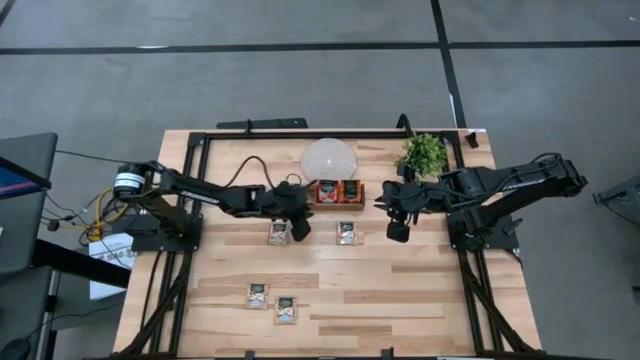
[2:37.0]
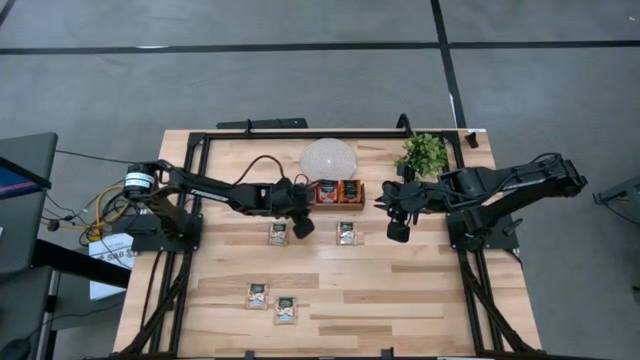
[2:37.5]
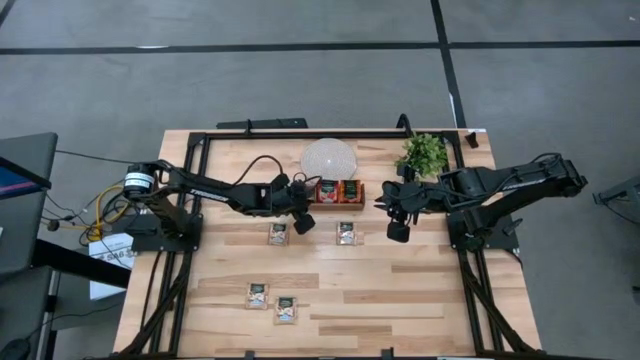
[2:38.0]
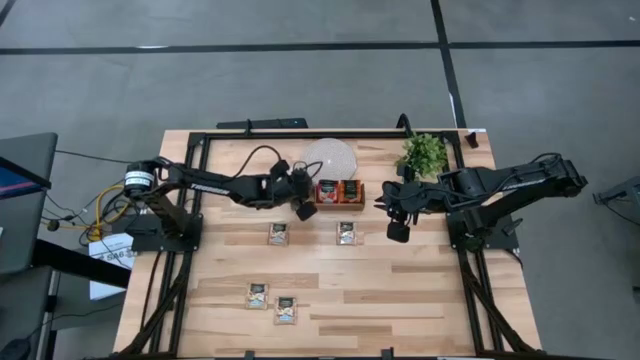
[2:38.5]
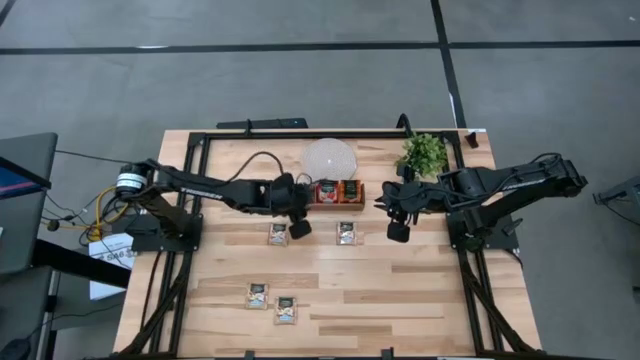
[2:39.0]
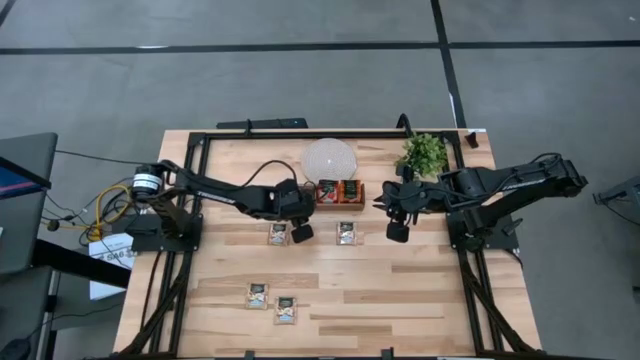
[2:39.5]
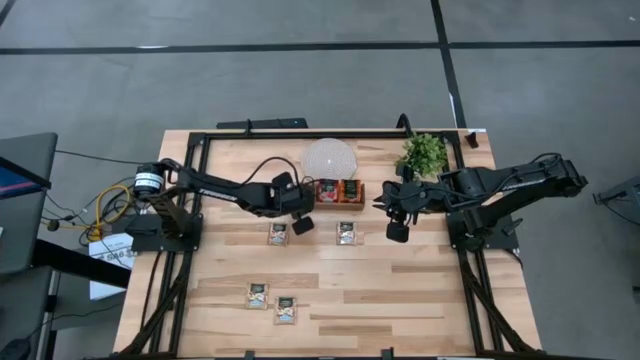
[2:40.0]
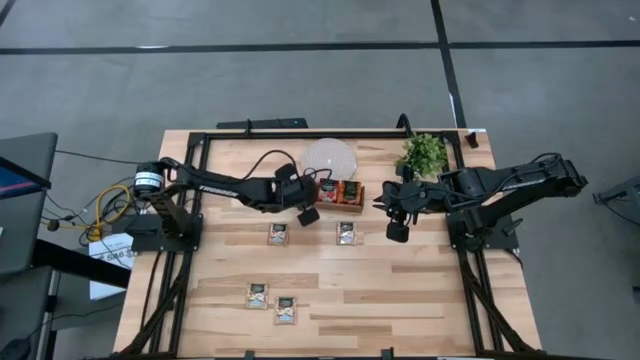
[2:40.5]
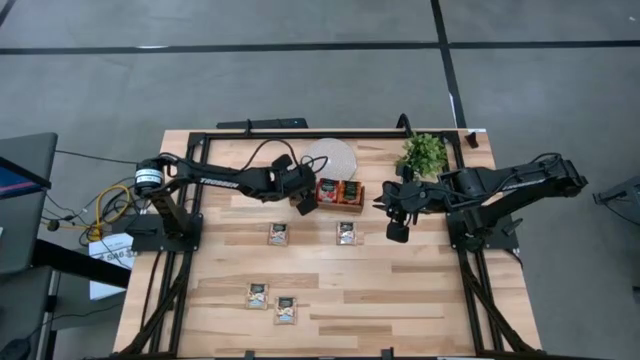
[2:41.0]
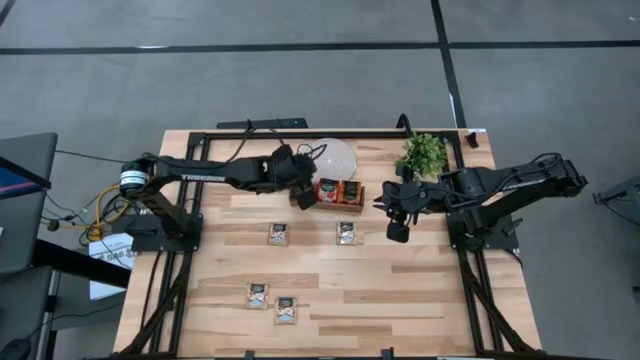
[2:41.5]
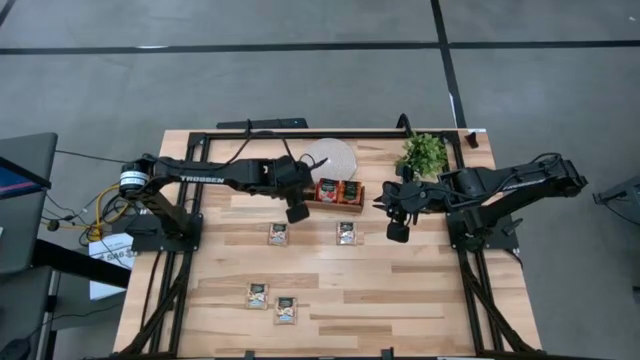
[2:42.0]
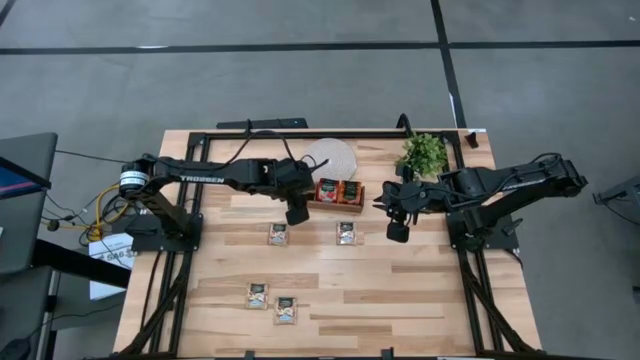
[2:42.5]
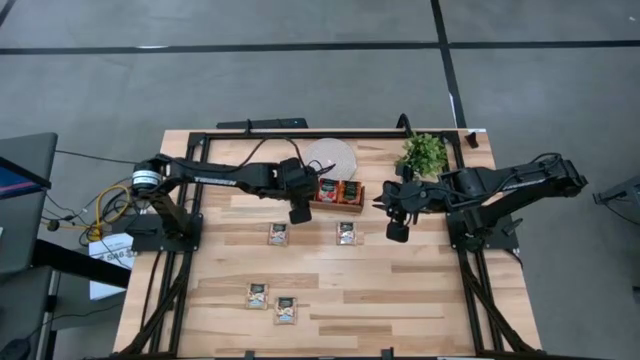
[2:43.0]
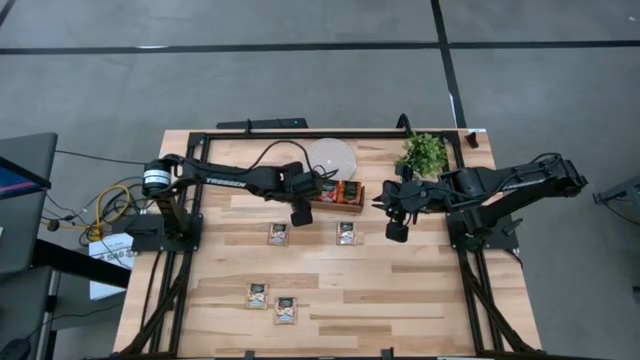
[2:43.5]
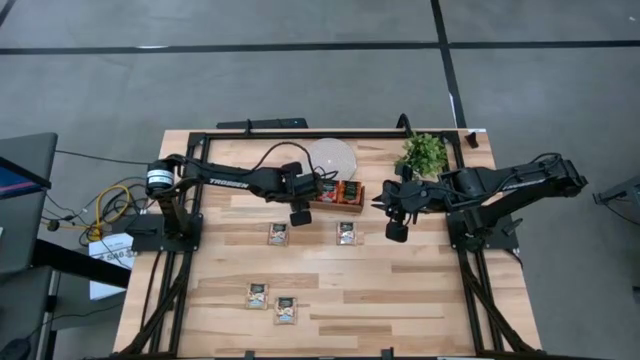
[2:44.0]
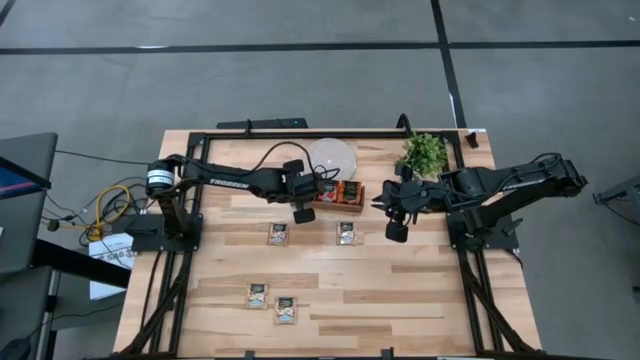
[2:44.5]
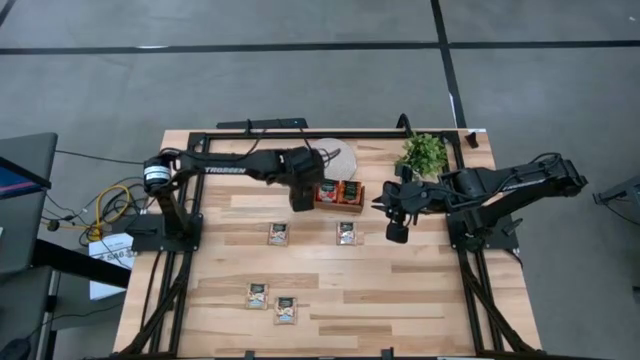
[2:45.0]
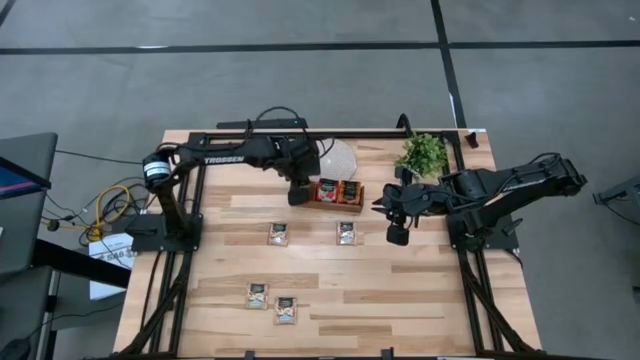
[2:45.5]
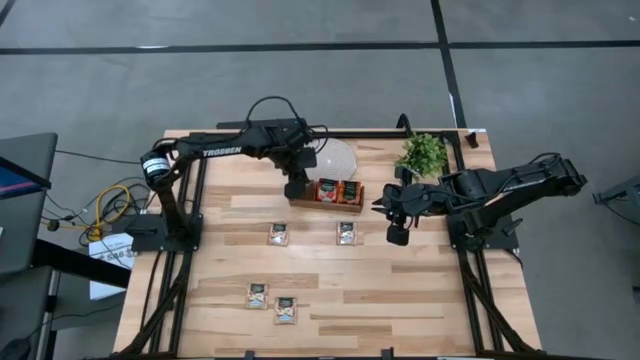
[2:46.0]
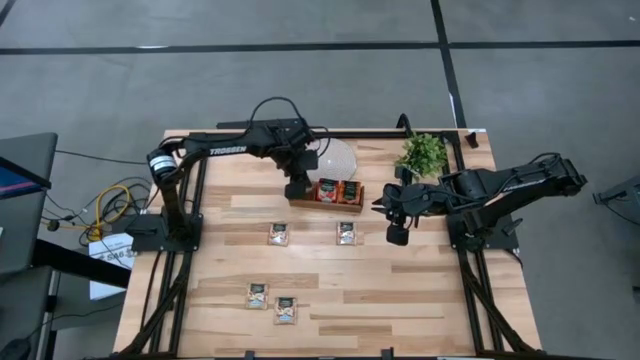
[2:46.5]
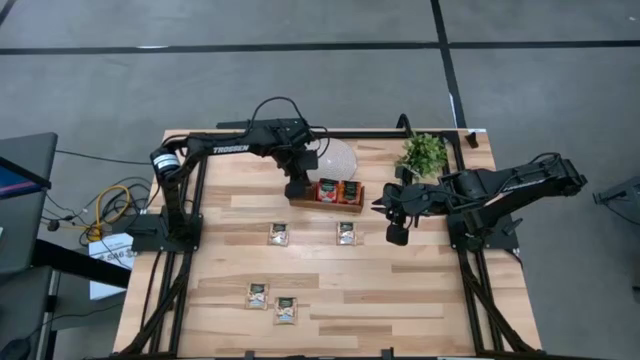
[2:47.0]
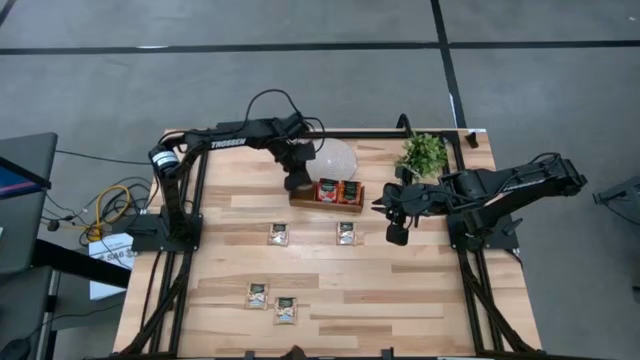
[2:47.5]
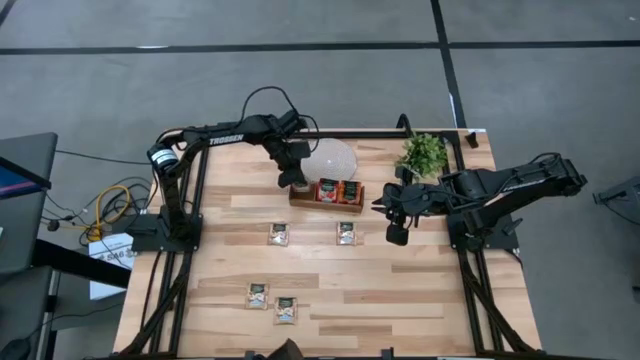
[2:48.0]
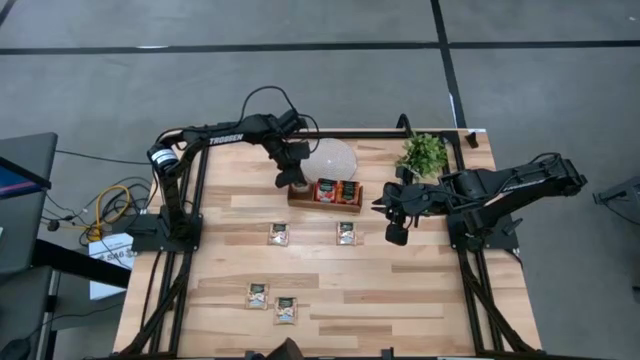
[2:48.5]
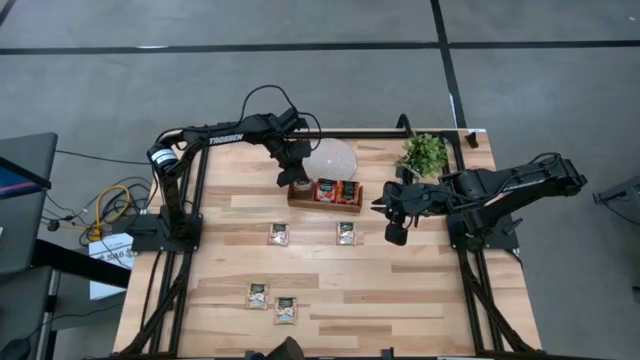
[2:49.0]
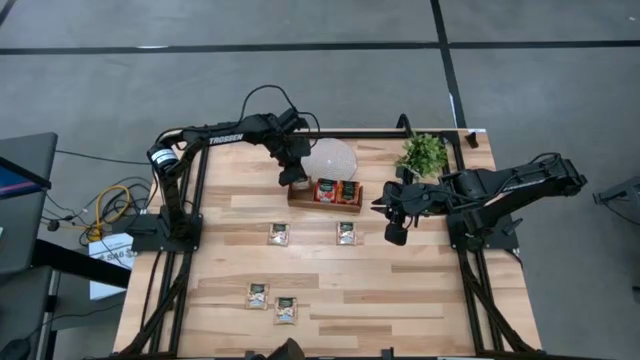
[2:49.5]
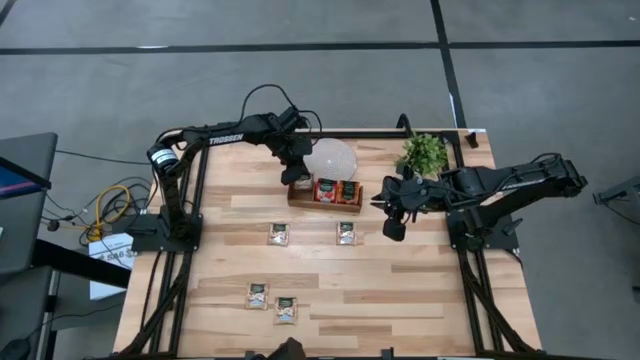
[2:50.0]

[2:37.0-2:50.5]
Task: Pick & Place Tea
Put the brown tea bag into the left compartment of the wooden organizer

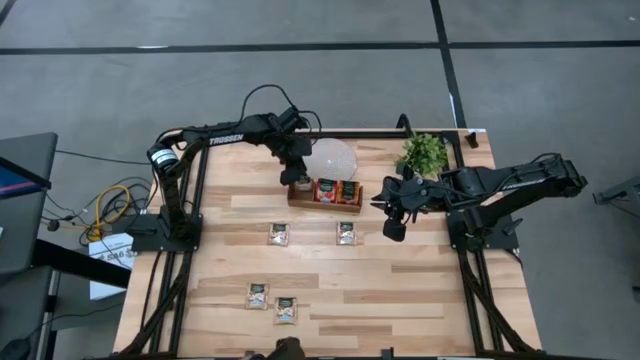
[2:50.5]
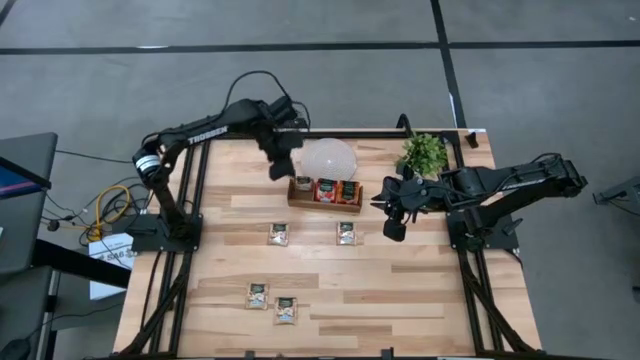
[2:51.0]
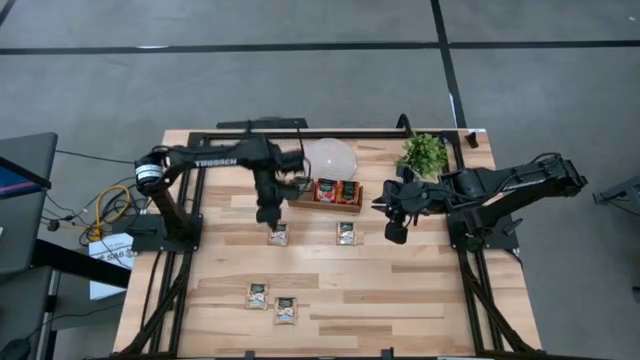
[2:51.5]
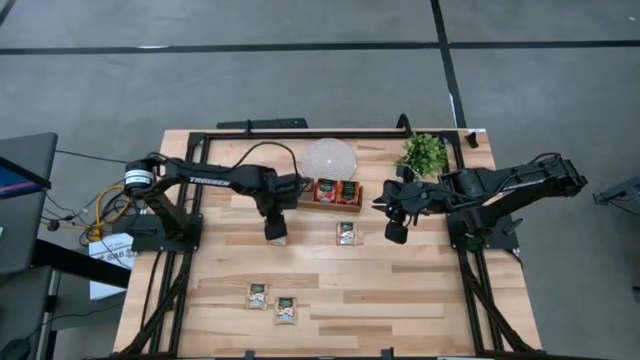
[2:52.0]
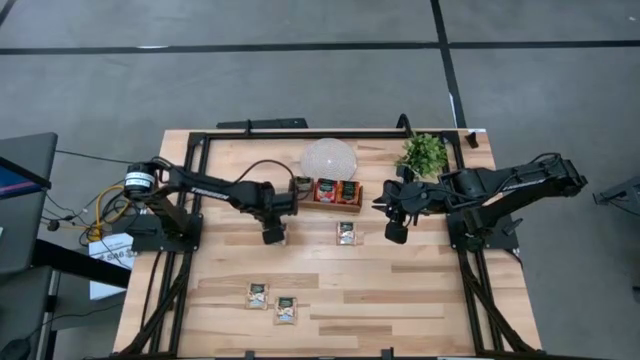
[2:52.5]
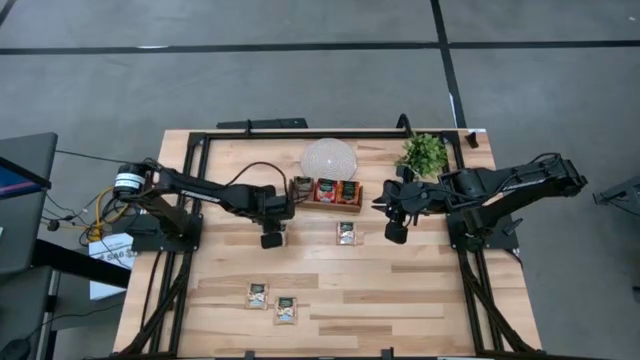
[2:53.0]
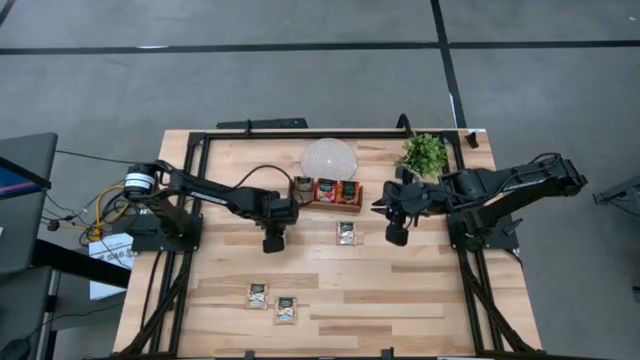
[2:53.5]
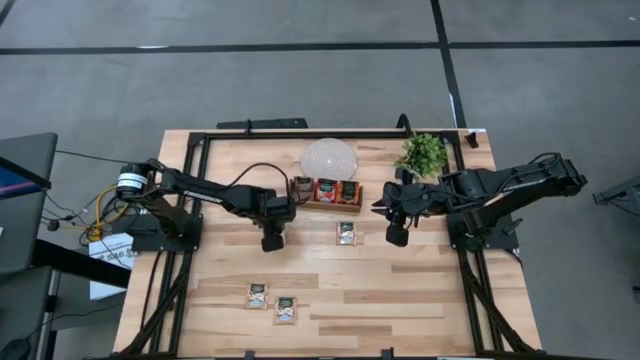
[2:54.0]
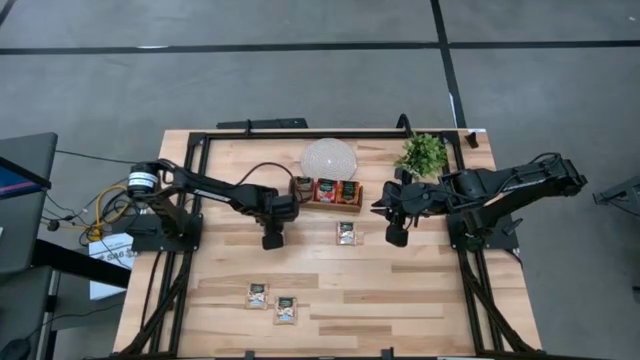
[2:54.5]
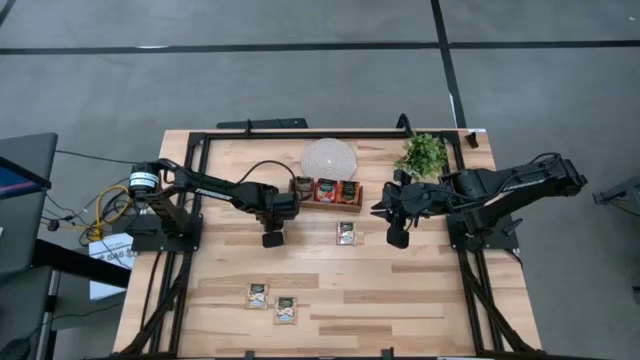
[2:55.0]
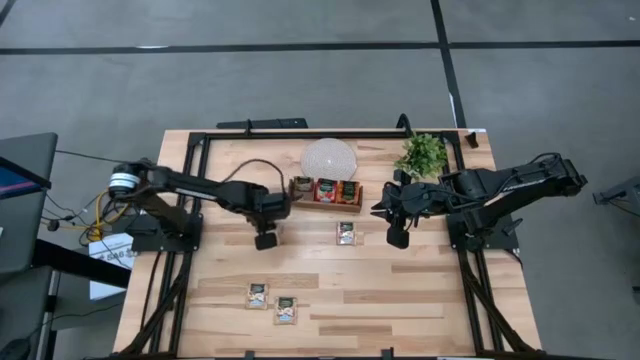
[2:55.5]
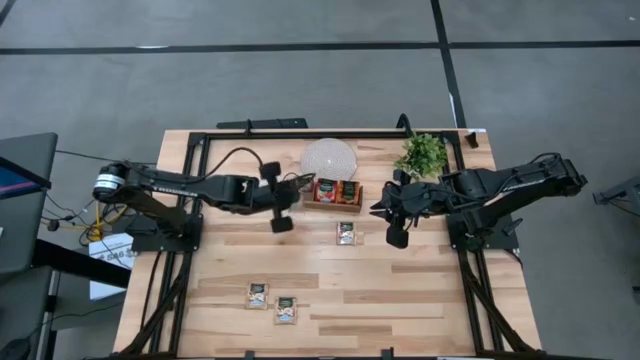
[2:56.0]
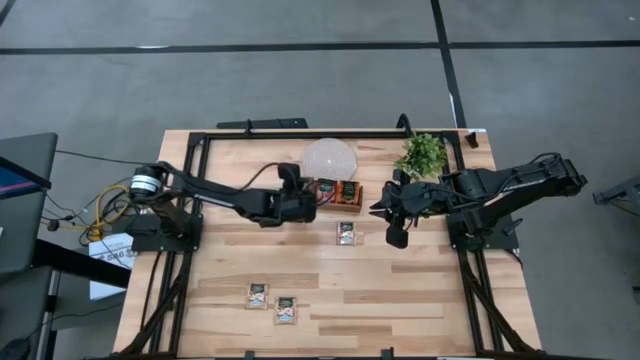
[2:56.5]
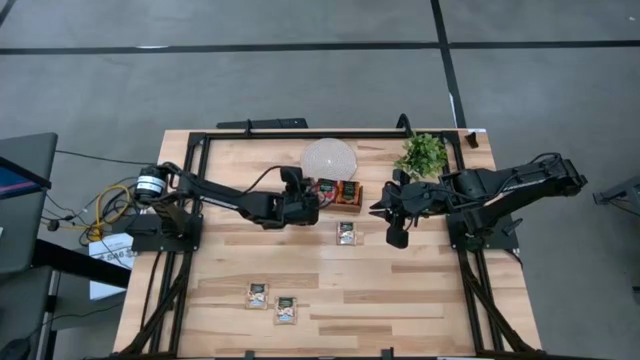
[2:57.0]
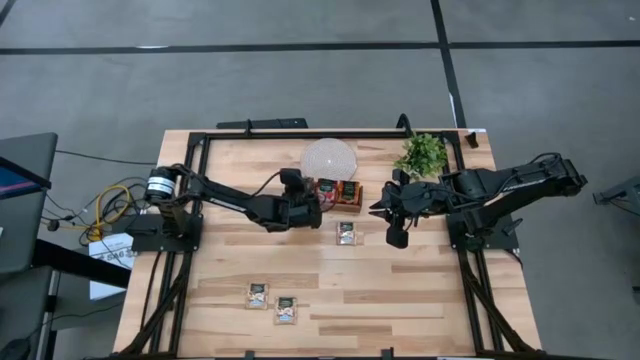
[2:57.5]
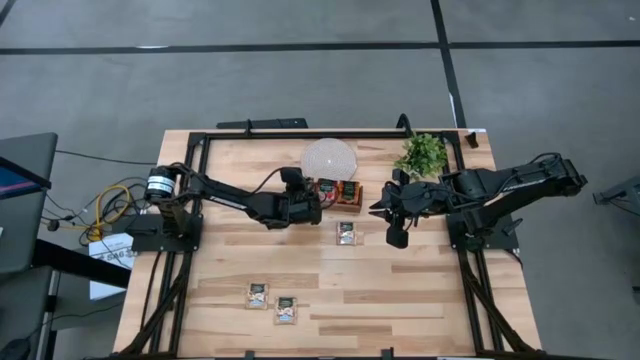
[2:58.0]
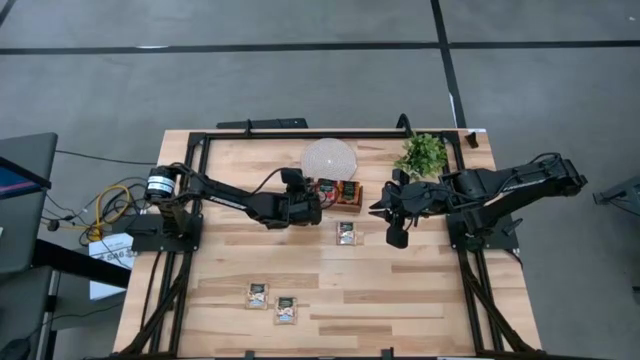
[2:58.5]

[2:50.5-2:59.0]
Put the brown tea bag into the left compartment of the wooden organizer
